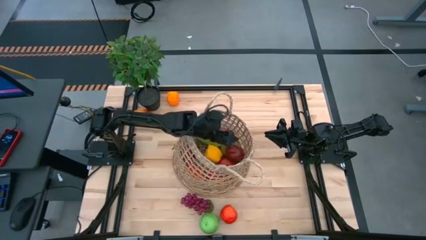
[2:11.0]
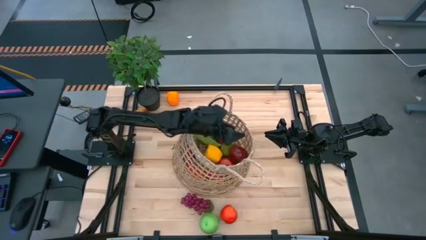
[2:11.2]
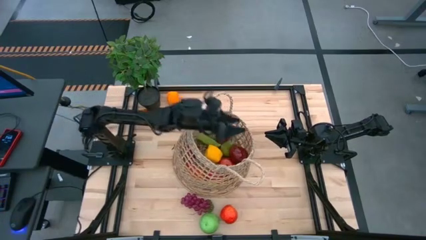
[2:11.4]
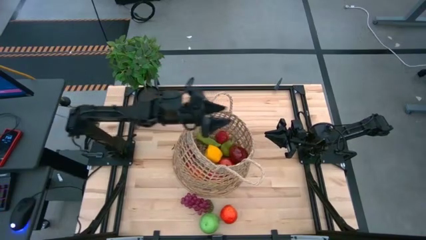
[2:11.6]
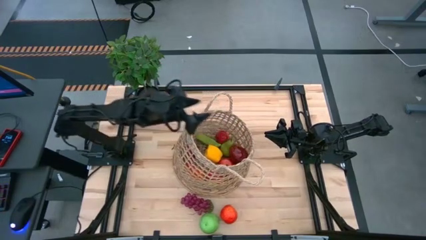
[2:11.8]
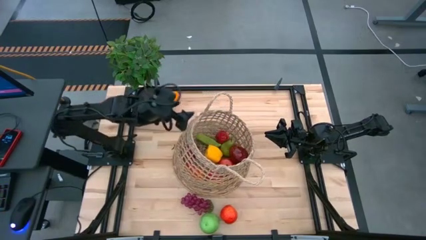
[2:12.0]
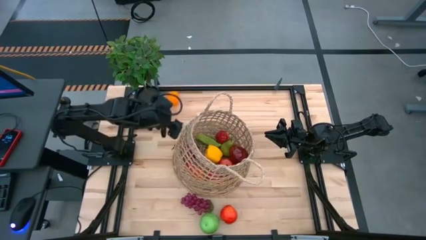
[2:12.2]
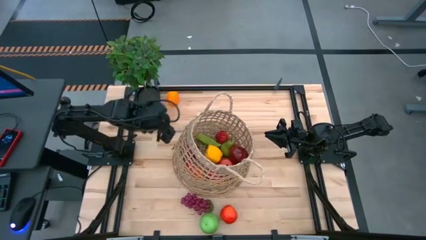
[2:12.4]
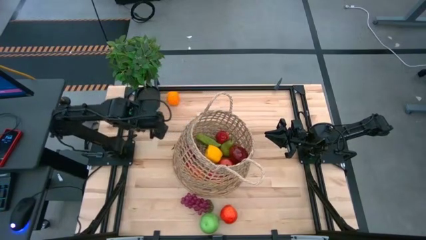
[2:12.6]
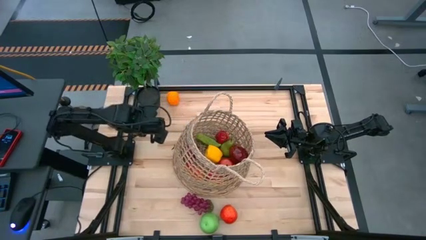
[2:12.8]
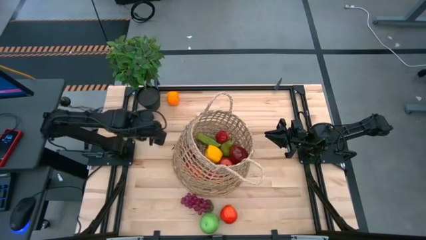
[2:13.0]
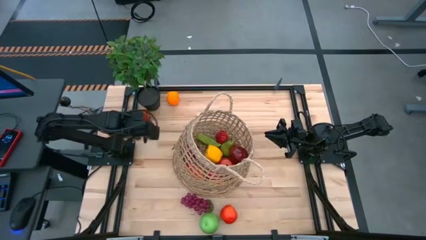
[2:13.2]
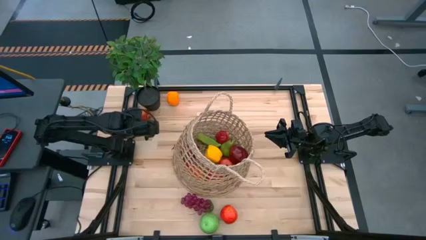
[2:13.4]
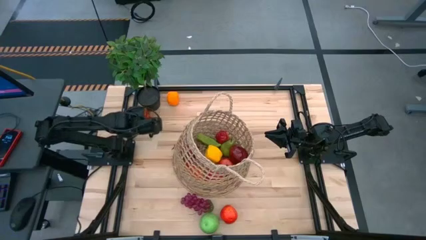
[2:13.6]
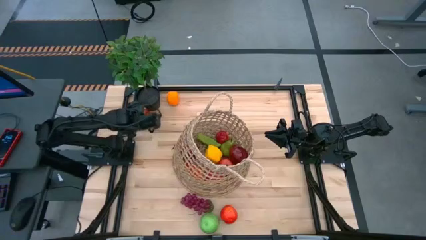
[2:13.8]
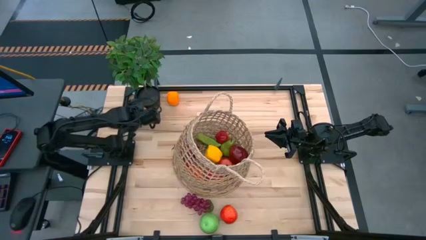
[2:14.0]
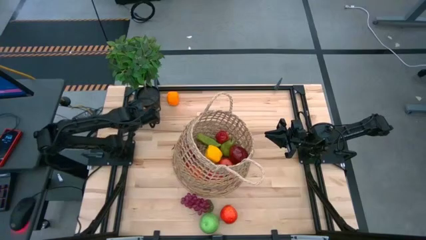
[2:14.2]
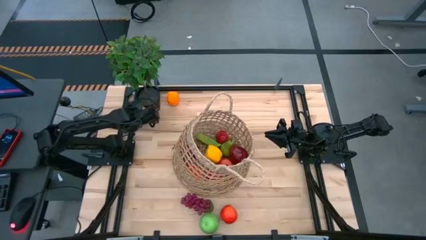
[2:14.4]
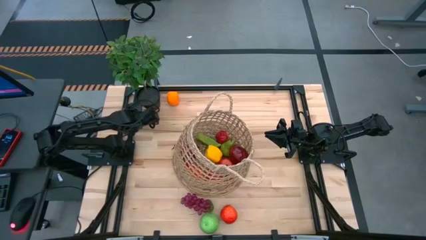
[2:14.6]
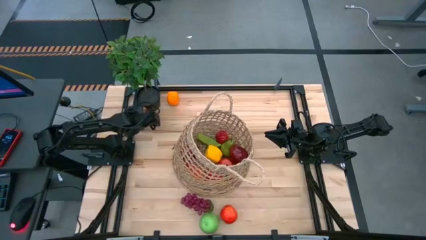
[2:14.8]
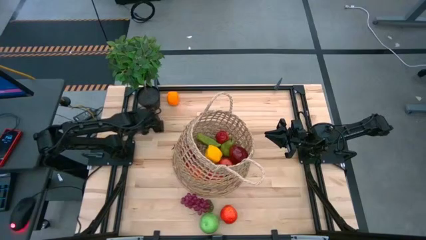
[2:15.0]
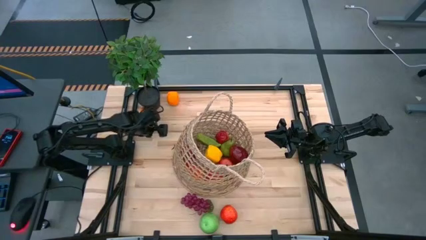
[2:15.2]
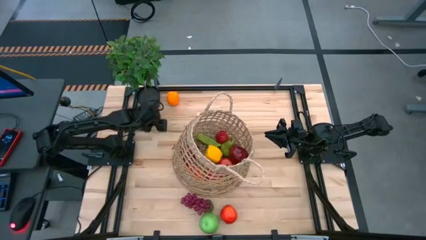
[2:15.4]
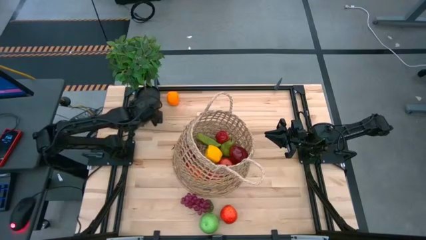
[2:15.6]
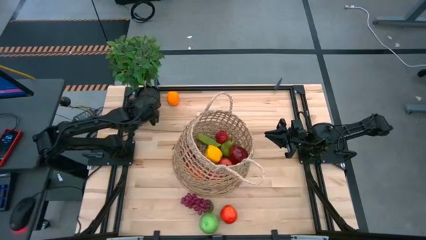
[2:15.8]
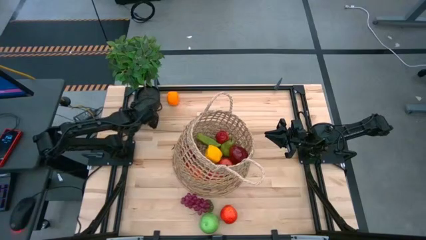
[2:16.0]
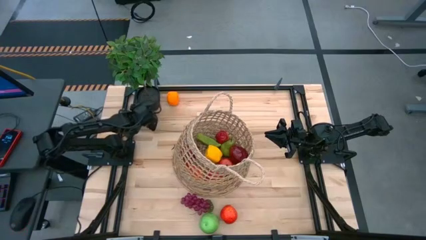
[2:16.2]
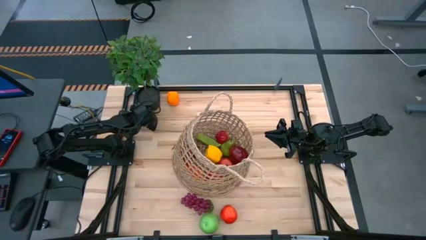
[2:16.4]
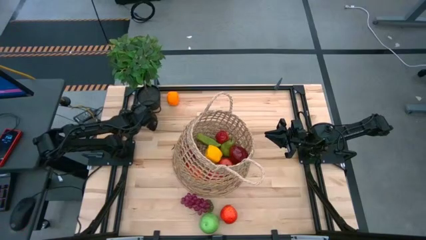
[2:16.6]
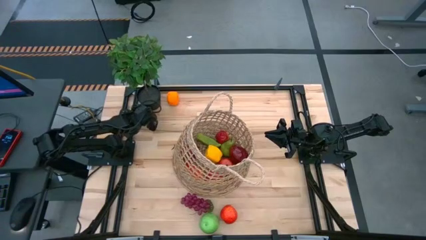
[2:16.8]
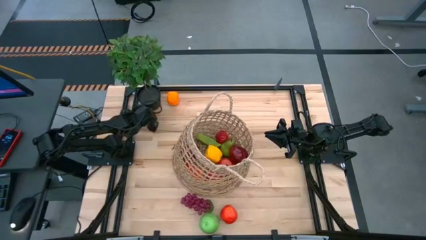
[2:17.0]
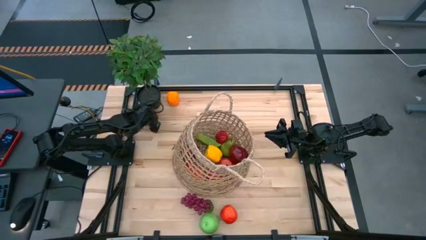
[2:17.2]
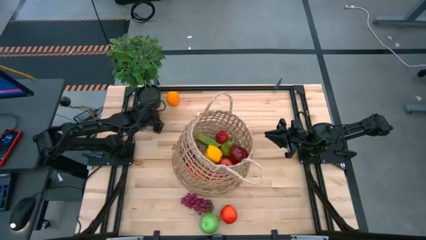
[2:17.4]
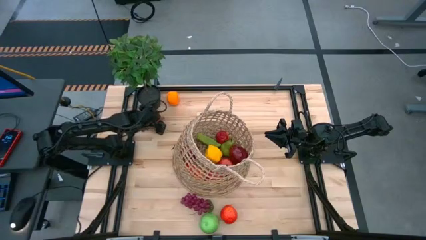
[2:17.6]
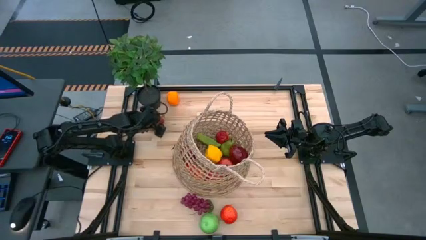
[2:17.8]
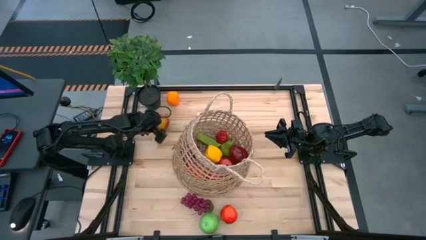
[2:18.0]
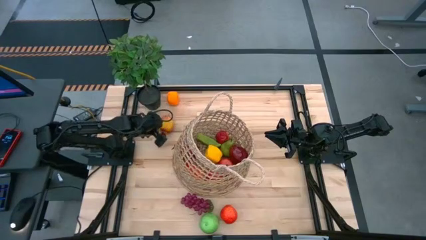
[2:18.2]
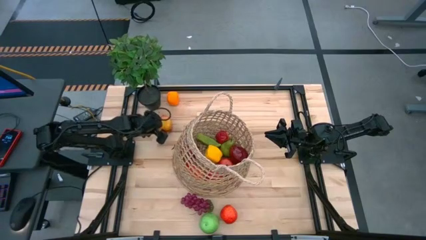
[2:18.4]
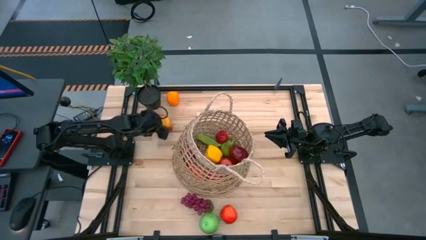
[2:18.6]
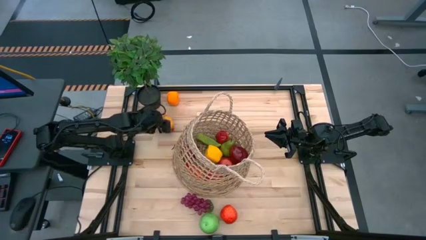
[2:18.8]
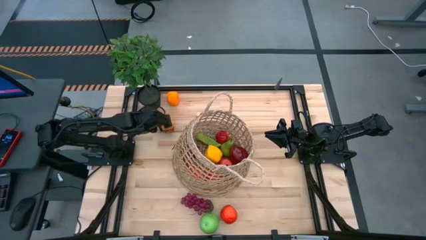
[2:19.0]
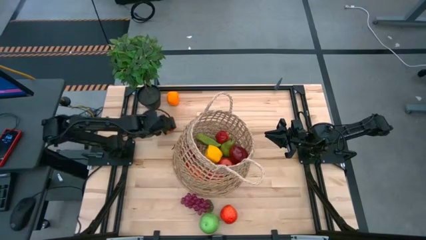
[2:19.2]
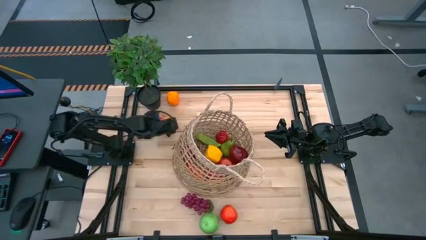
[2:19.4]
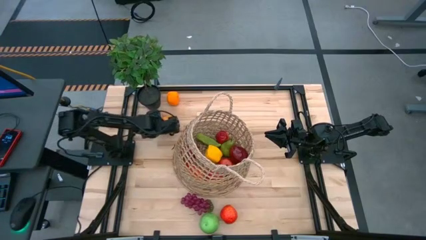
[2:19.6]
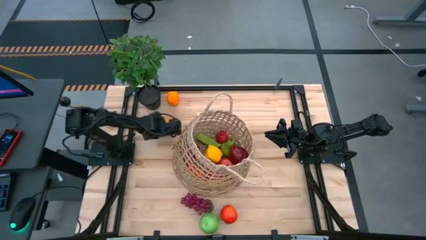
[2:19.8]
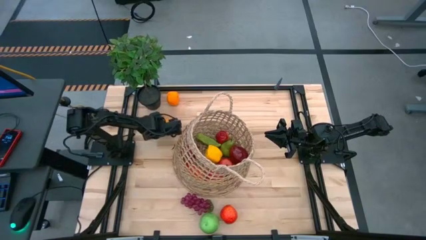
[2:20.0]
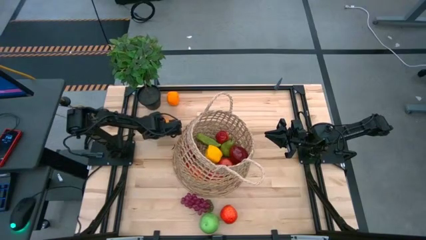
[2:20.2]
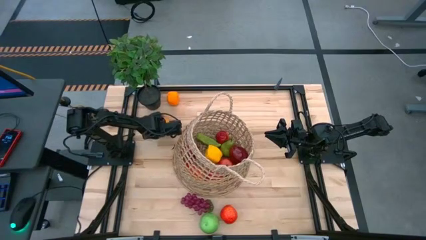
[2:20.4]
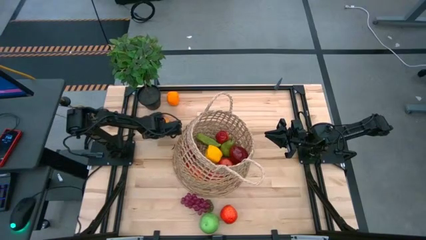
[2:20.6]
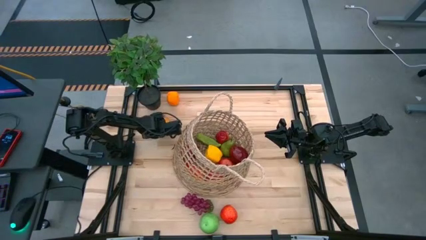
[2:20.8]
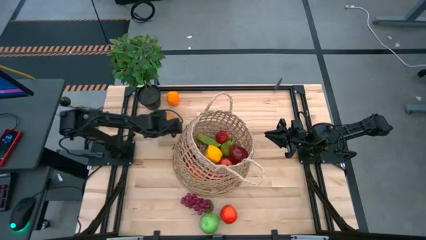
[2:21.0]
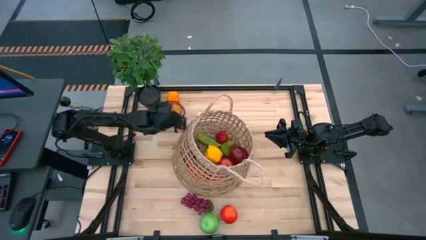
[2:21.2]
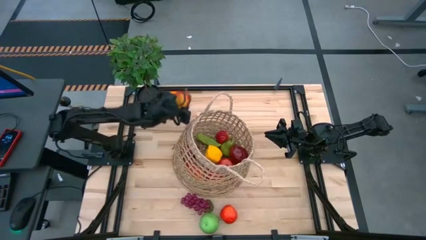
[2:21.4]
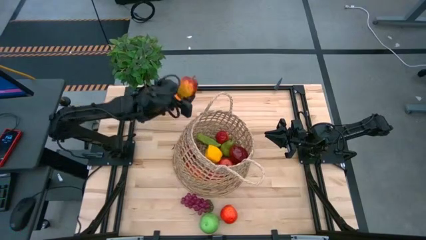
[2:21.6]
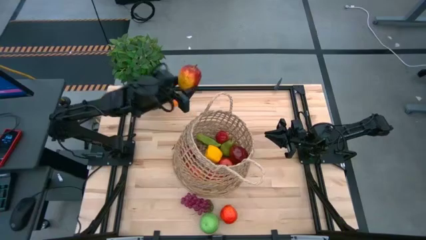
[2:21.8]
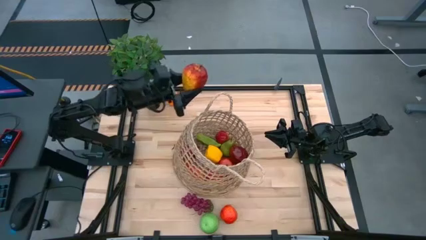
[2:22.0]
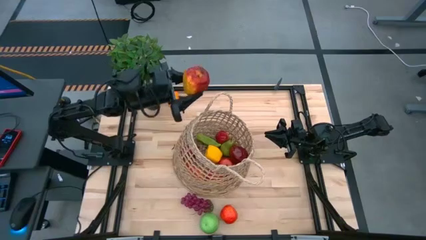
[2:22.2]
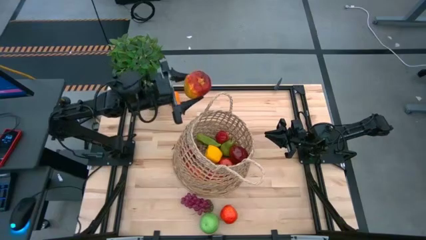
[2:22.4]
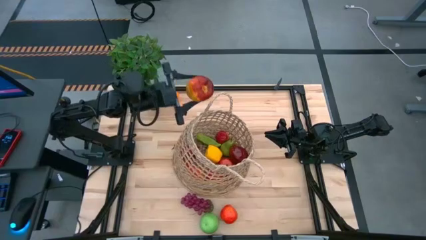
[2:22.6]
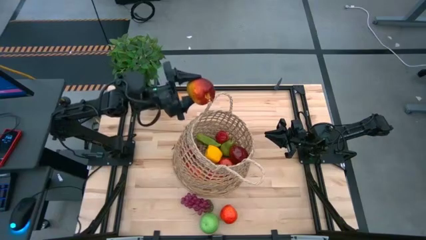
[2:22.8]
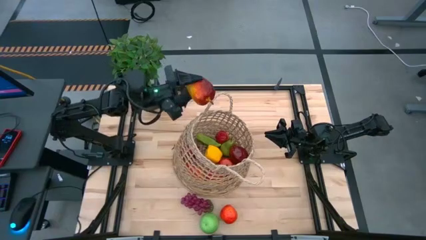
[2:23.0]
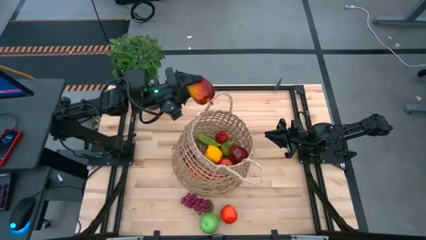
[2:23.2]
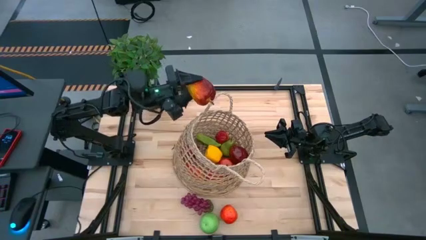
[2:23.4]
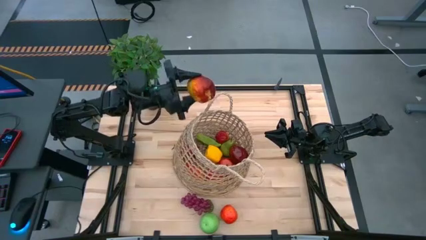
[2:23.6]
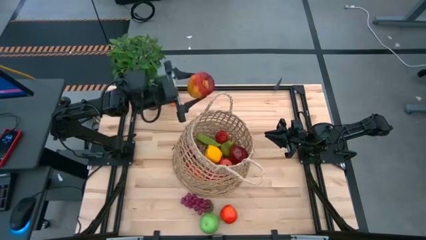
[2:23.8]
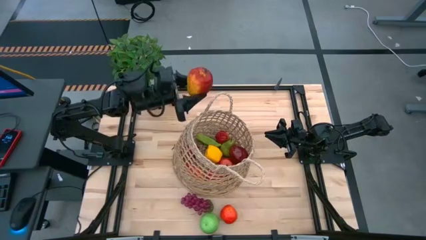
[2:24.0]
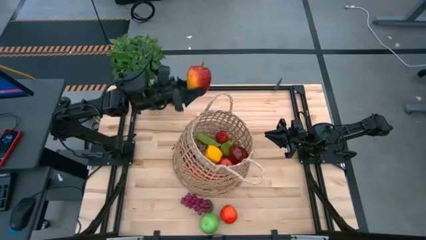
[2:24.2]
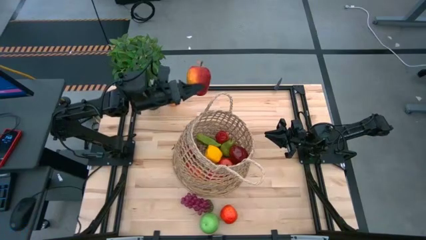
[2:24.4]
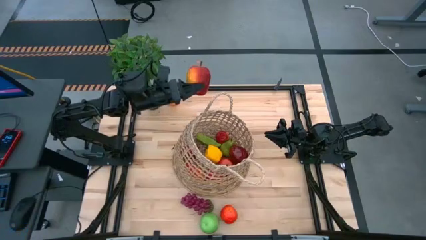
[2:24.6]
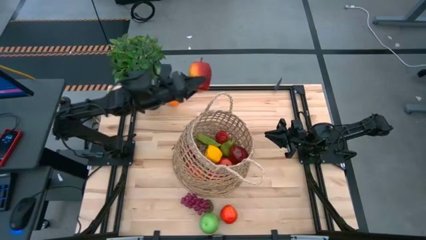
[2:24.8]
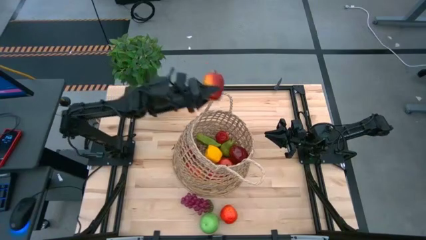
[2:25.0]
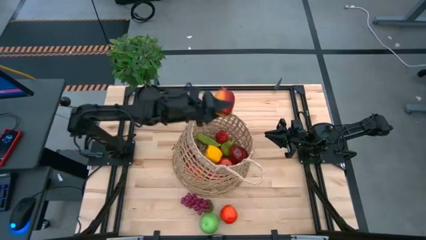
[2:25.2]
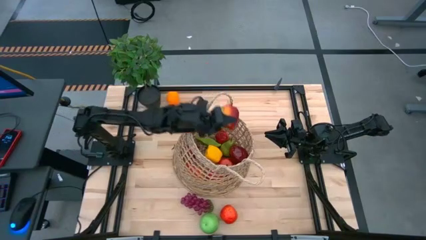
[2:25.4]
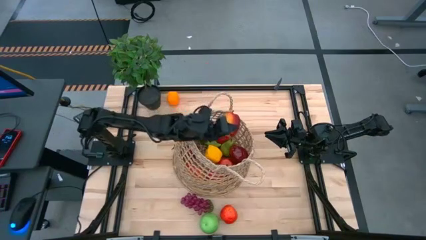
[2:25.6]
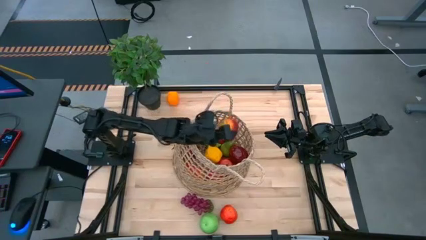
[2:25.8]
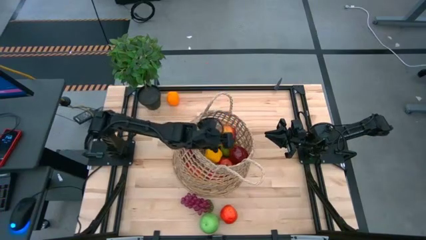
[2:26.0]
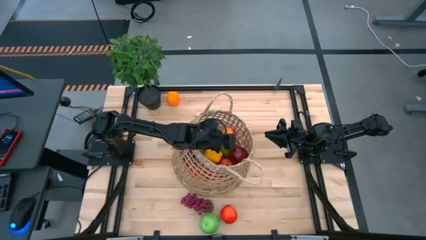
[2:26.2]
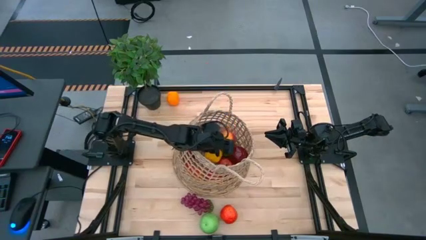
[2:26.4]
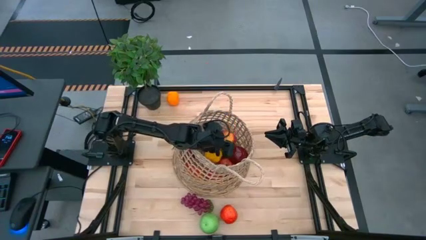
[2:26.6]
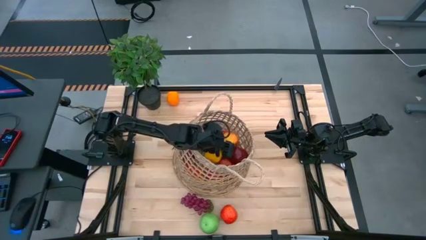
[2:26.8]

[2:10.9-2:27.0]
Task: Build produce basket
Put the apple into the basket
